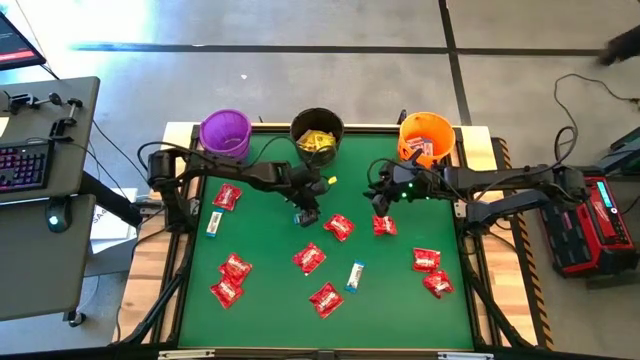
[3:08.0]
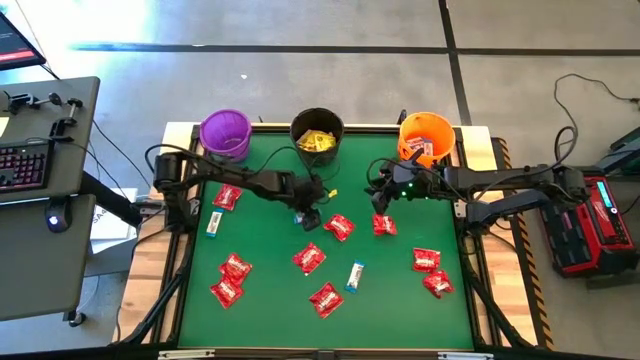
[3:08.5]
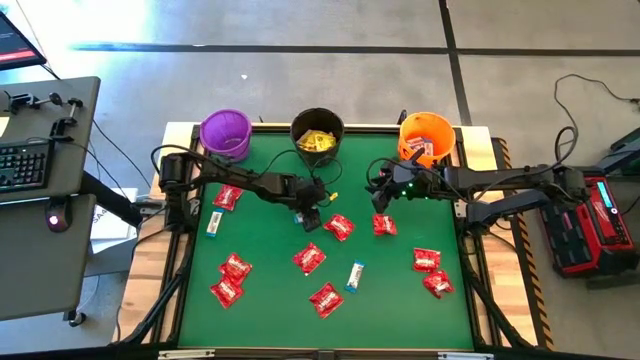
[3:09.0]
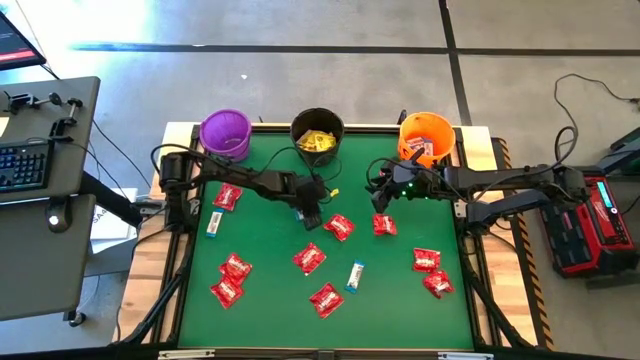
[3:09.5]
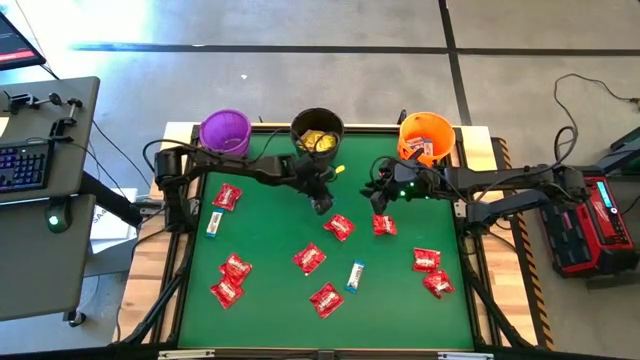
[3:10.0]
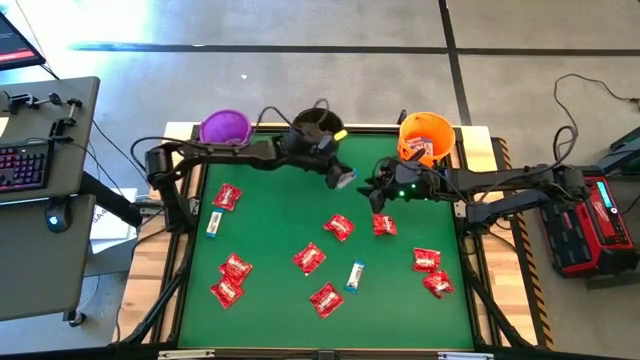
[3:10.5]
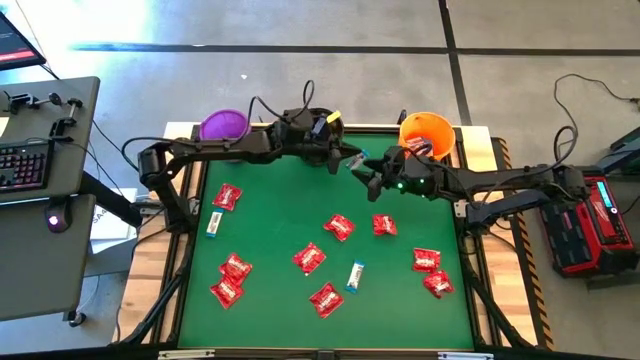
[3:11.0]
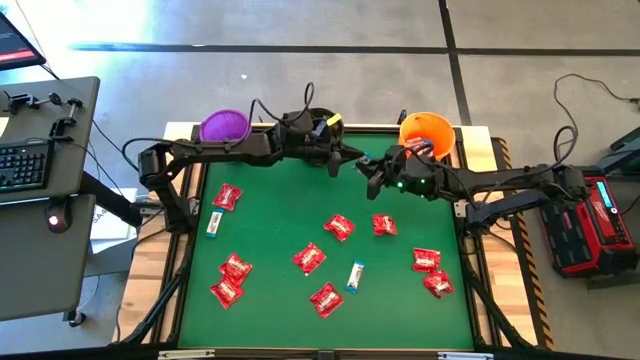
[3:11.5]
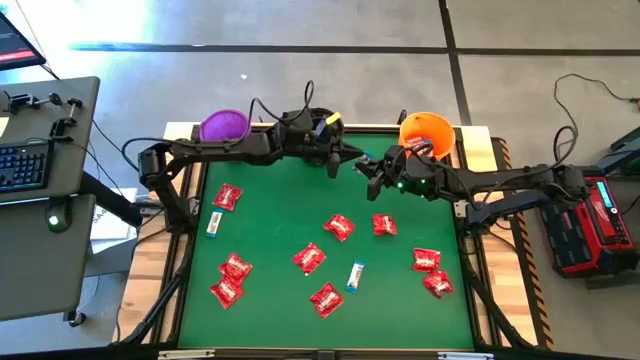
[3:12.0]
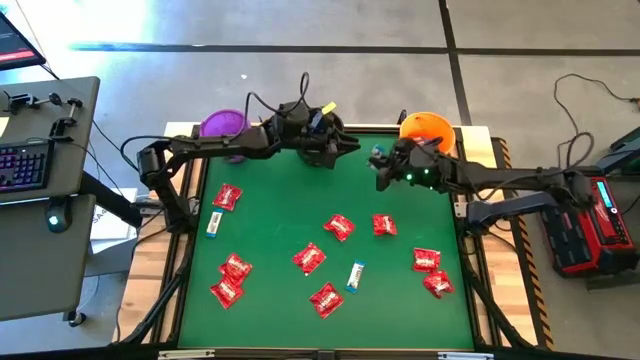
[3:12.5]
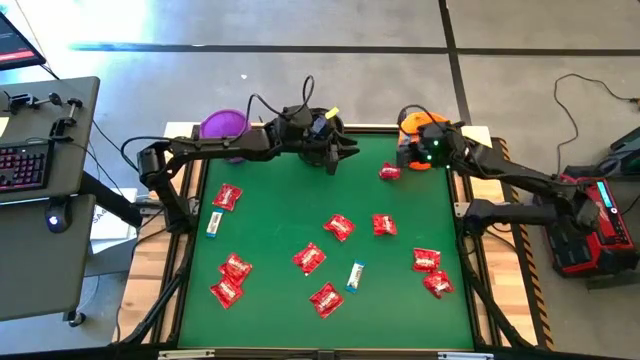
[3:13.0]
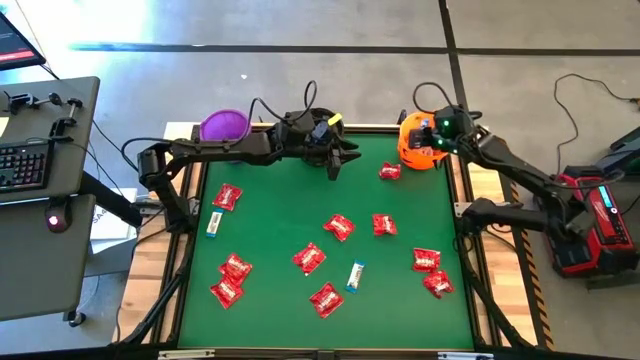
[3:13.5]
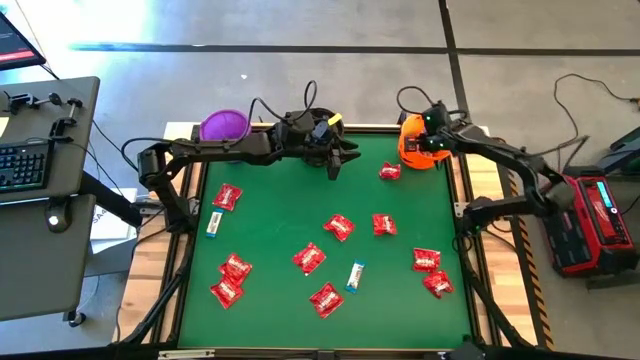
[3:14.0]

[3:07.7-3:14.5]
Task: Sort candy by brand, put in halloween buckets
Put the blue chocolate bar into the orange bucket

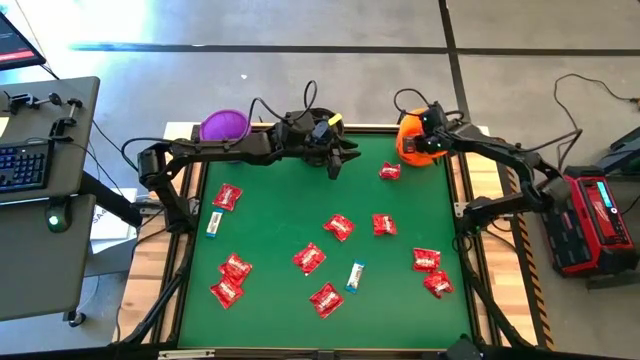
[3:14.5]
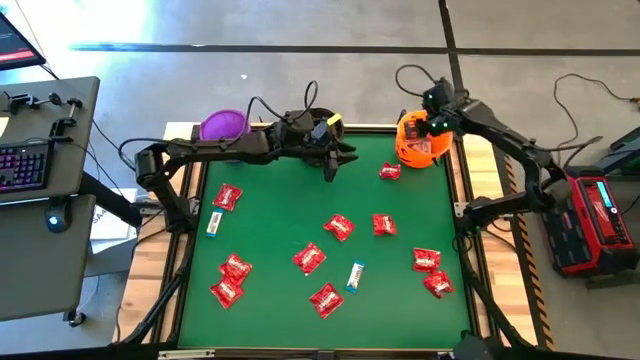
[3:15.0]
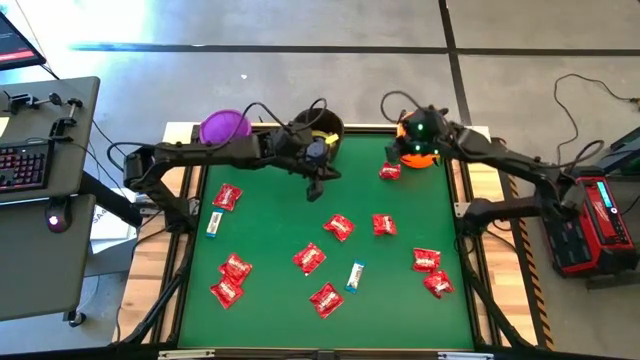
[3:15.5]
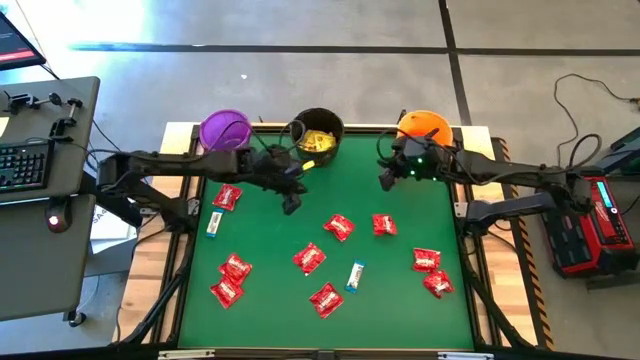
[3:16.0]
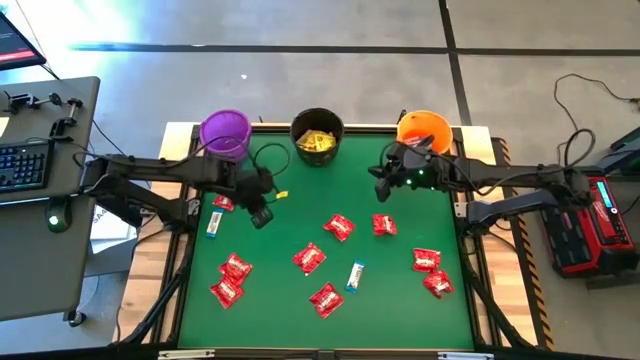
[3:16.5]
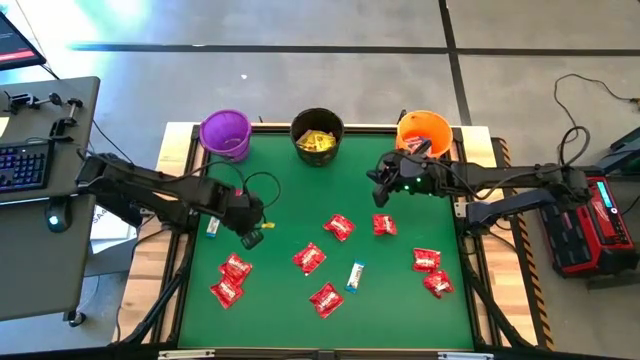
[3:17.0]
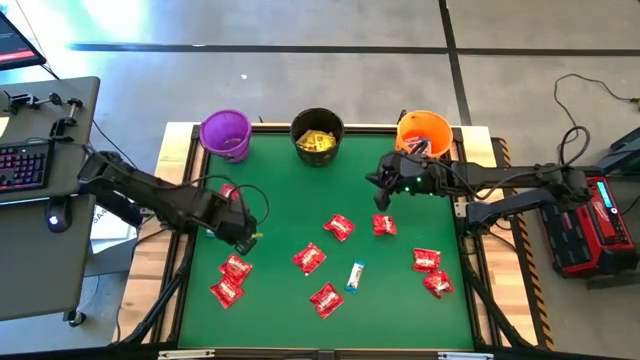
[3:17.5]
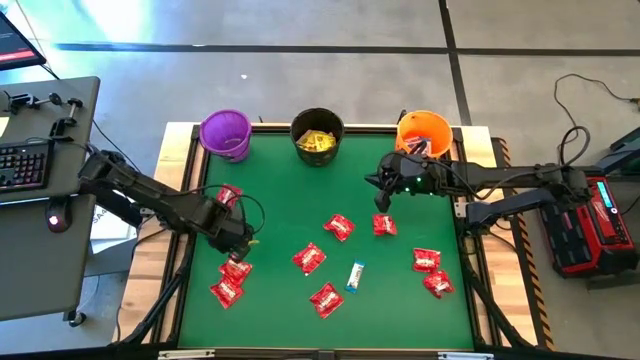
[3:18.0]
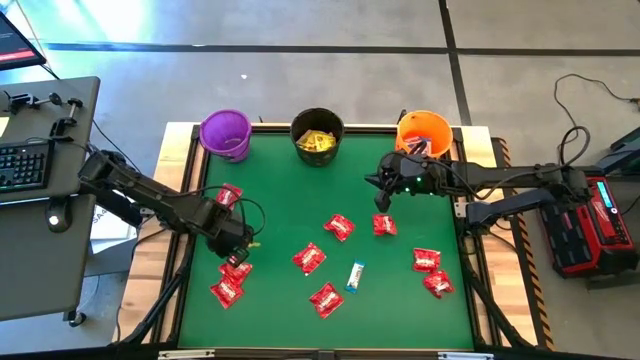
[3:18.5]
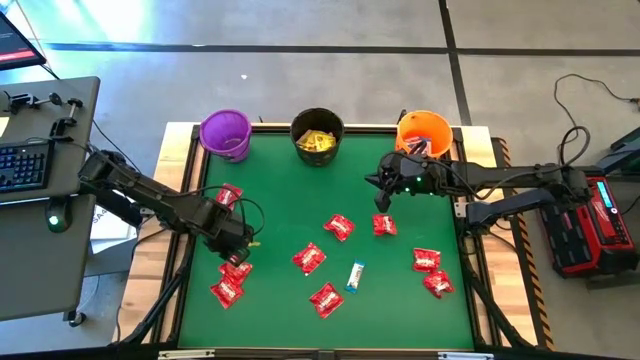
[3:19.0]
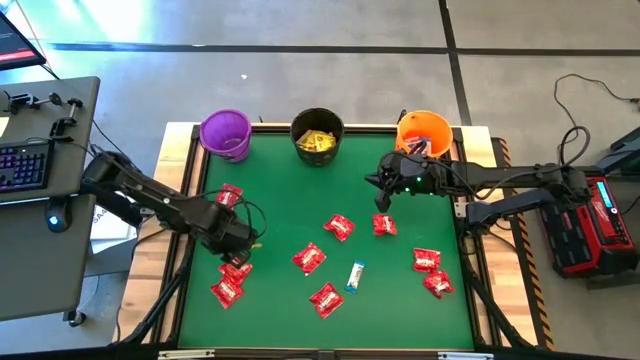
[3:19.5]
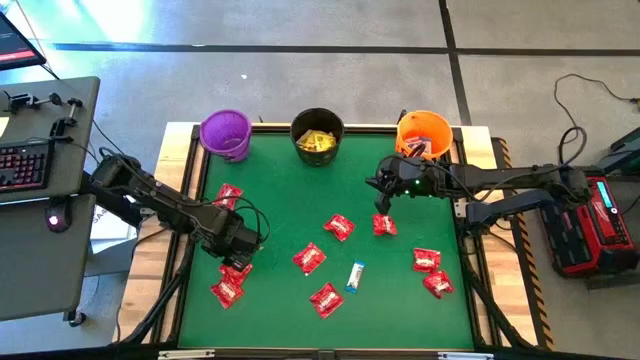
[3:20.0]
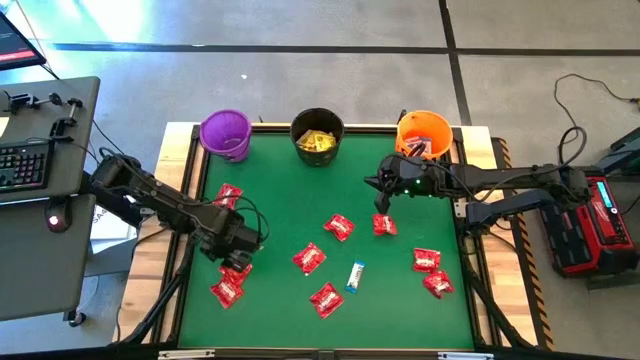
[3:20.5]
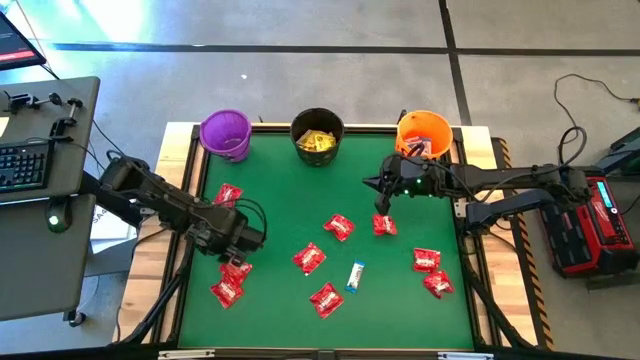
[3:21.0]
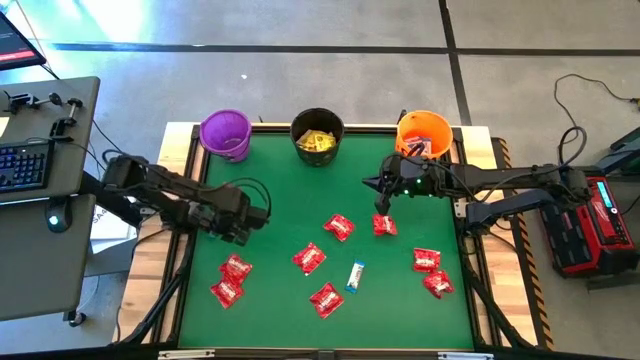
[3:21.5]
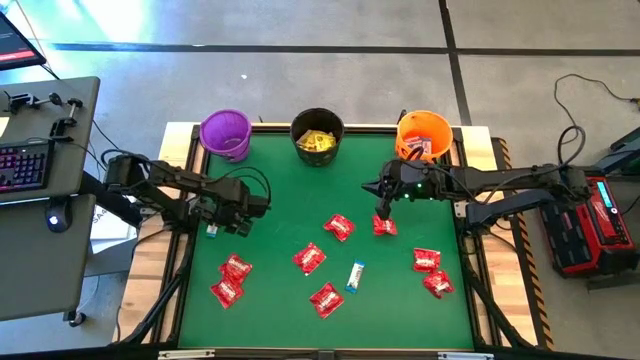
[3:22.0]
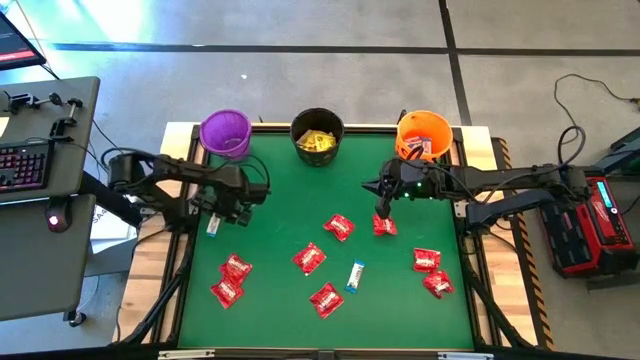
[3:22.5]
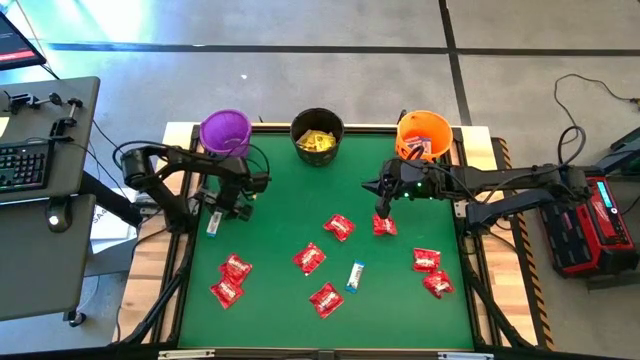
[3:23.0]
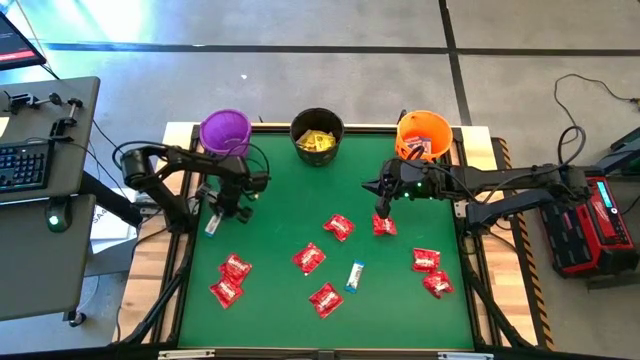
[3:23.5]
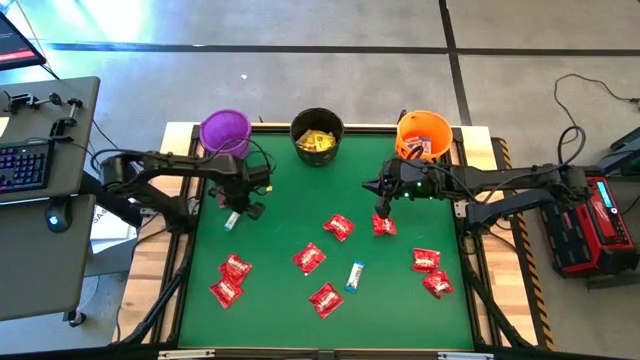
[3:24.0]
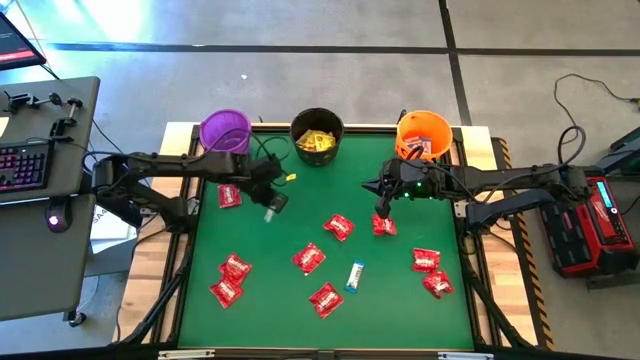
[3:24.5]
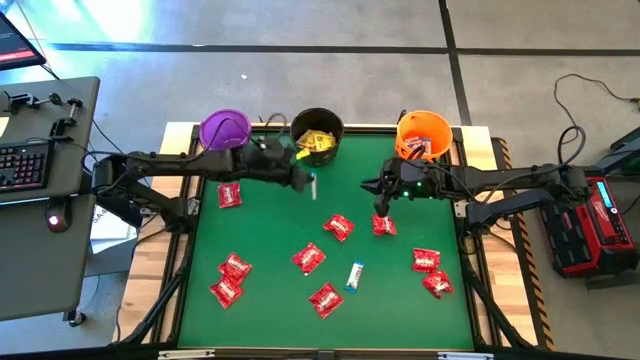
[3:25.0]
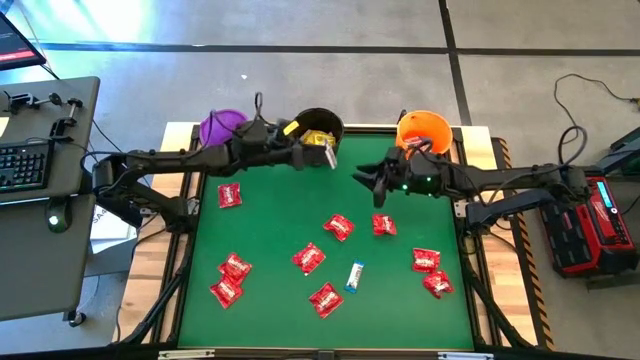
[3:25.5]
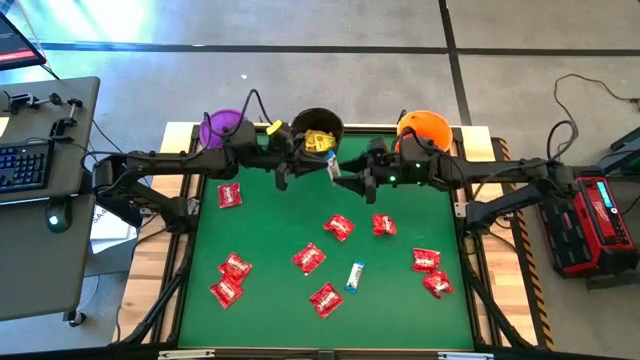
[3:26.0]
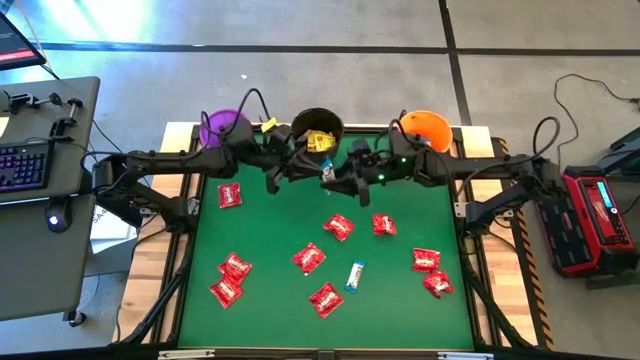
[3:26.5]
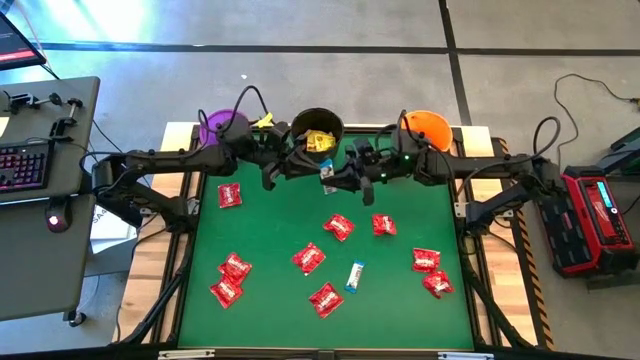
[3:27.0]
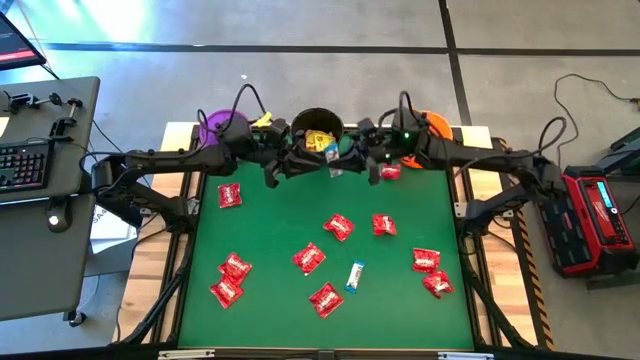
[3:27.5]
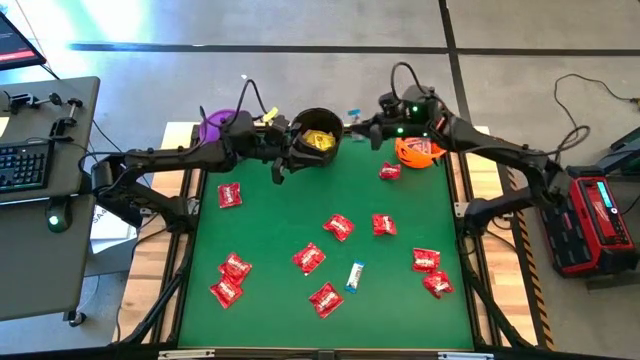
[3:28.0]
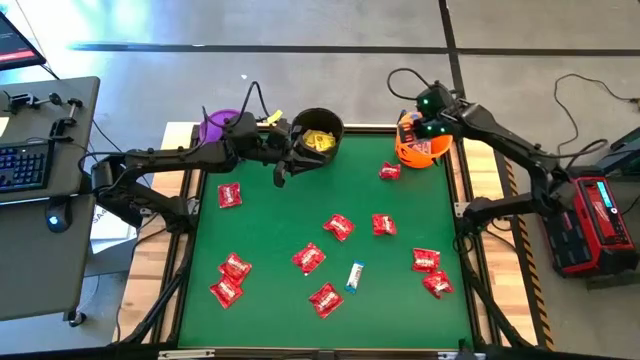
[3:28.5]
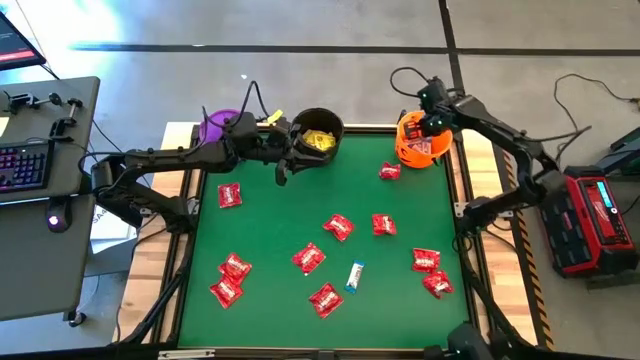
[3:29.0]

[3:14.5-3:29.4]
Put the blue chocolate bar into the orange bucket
